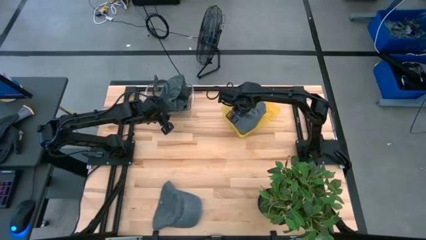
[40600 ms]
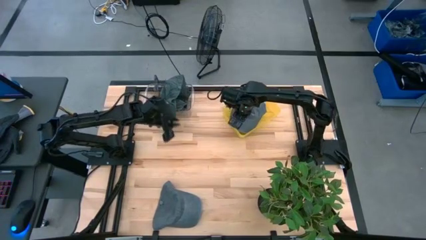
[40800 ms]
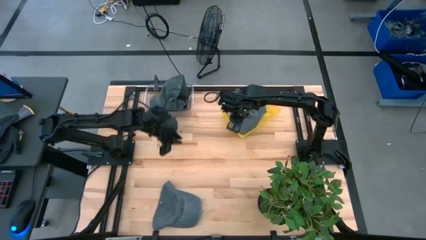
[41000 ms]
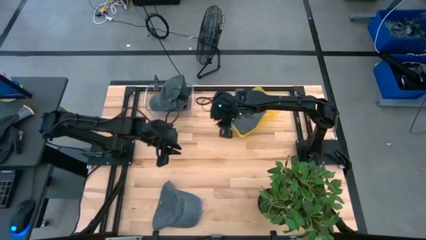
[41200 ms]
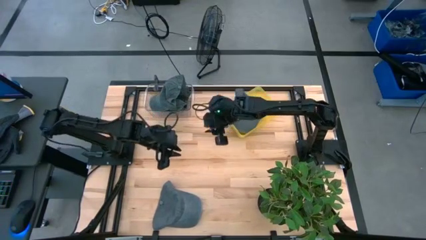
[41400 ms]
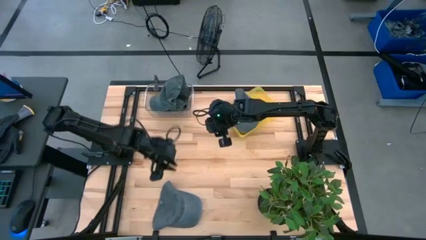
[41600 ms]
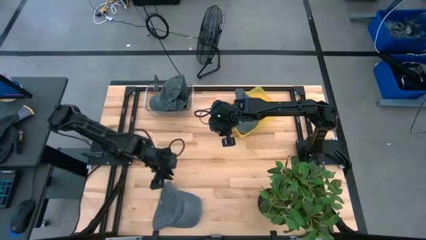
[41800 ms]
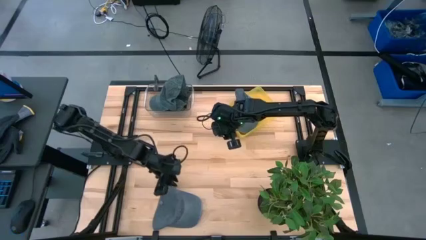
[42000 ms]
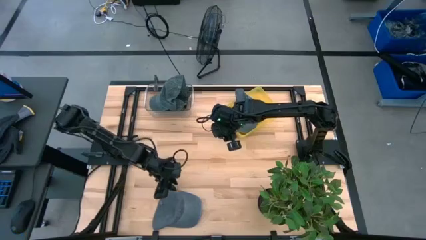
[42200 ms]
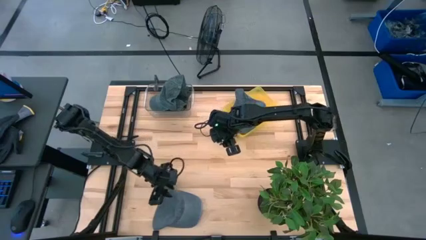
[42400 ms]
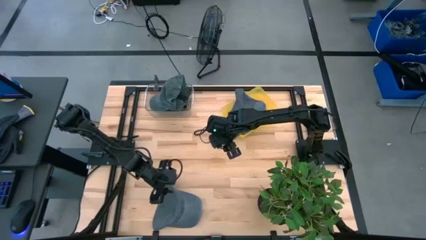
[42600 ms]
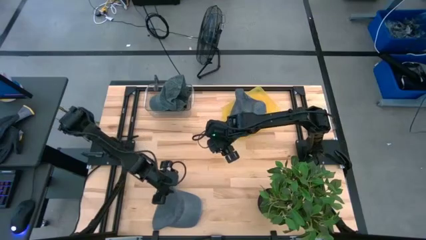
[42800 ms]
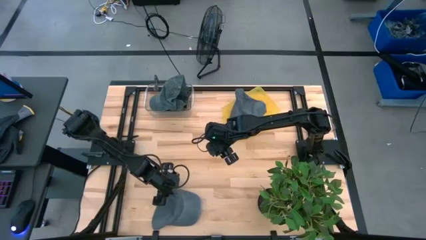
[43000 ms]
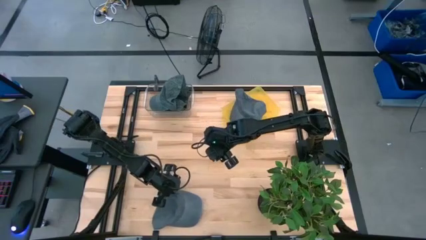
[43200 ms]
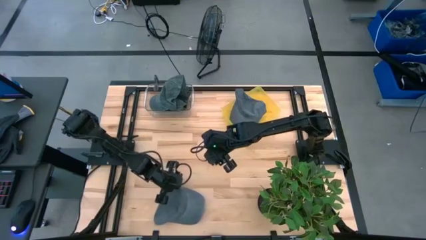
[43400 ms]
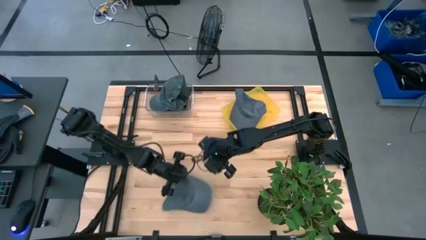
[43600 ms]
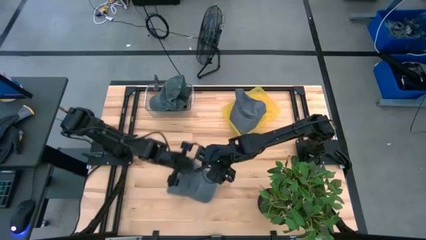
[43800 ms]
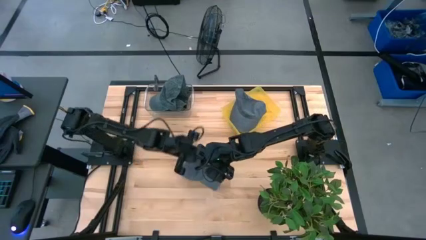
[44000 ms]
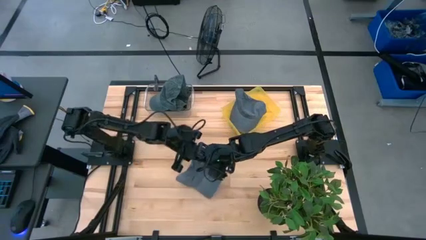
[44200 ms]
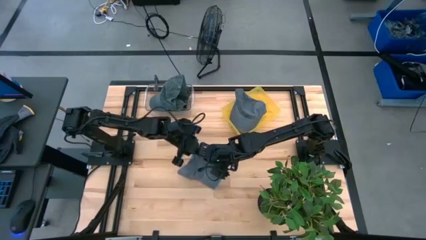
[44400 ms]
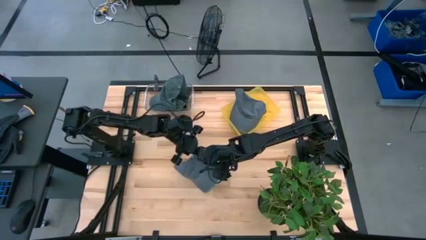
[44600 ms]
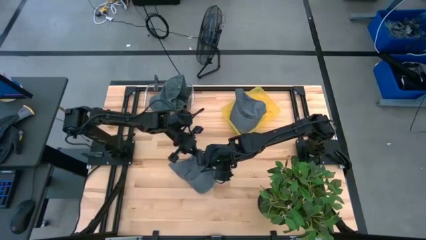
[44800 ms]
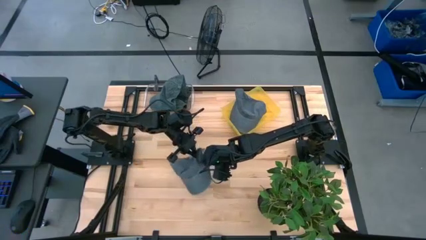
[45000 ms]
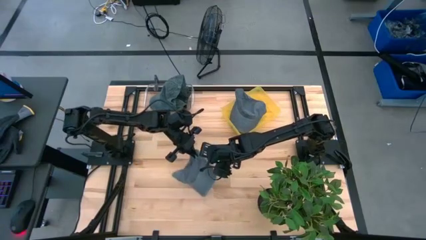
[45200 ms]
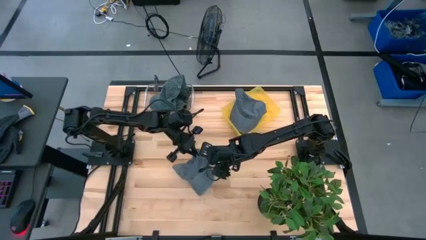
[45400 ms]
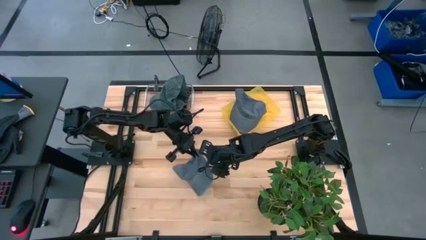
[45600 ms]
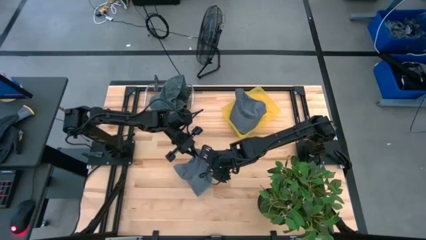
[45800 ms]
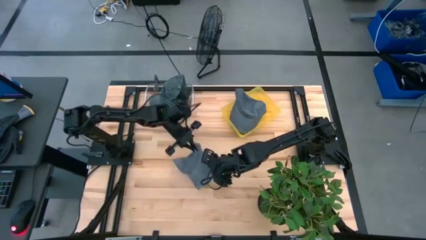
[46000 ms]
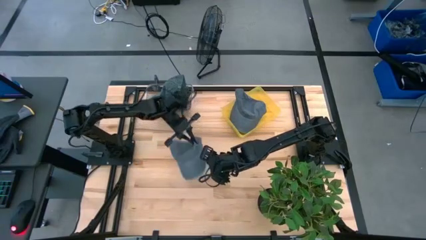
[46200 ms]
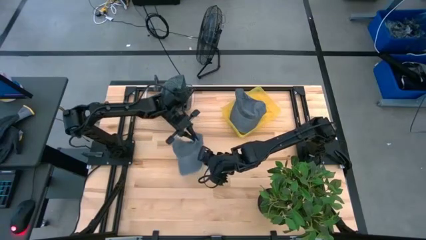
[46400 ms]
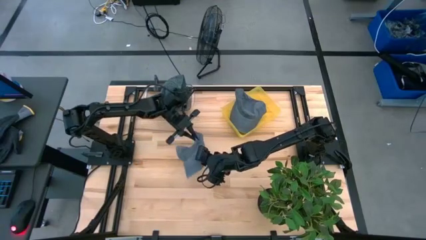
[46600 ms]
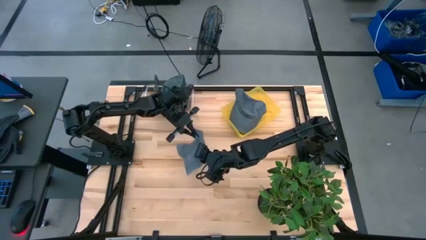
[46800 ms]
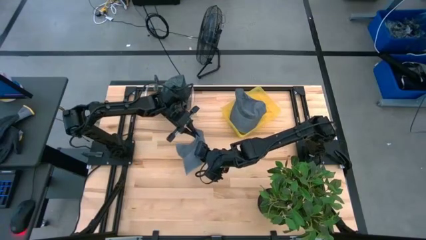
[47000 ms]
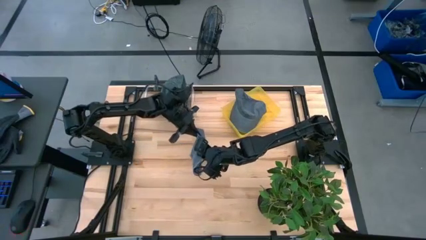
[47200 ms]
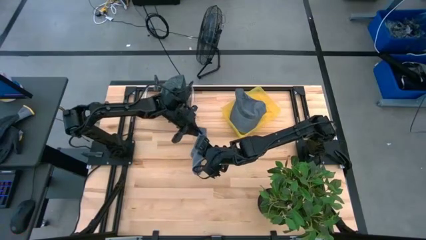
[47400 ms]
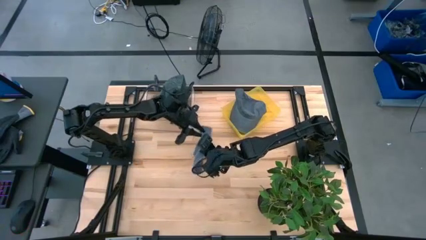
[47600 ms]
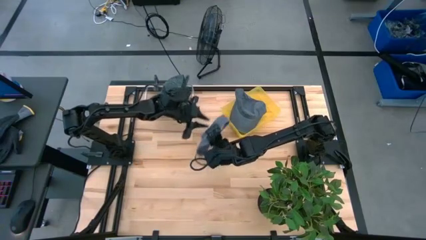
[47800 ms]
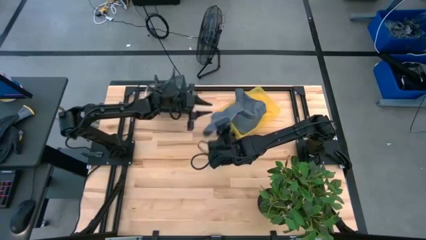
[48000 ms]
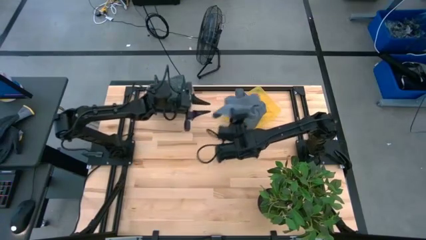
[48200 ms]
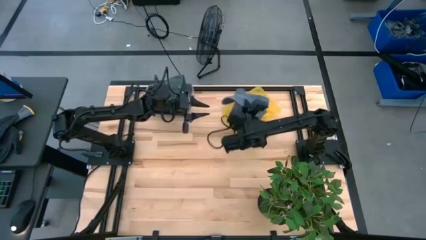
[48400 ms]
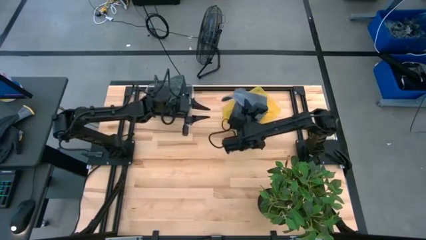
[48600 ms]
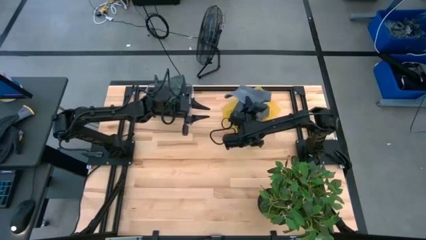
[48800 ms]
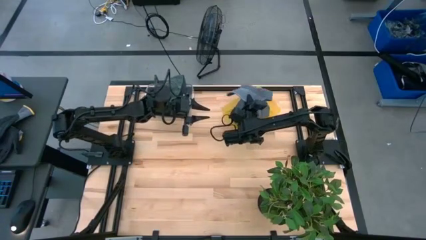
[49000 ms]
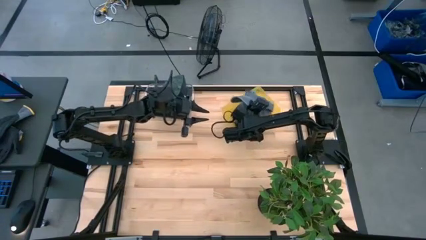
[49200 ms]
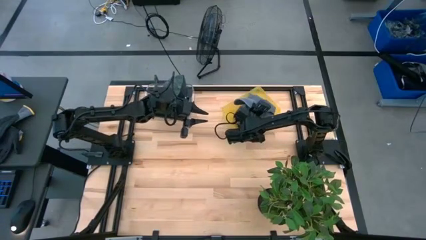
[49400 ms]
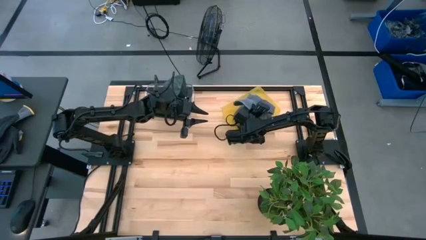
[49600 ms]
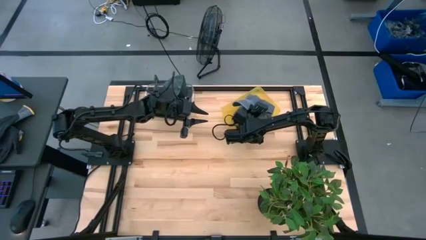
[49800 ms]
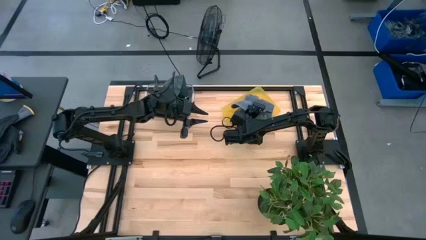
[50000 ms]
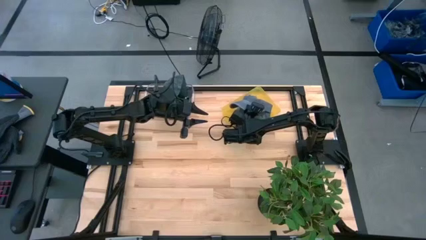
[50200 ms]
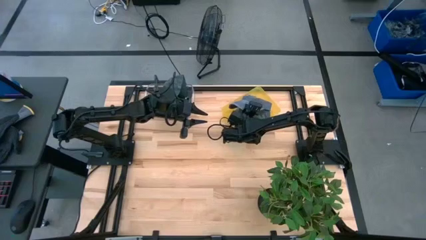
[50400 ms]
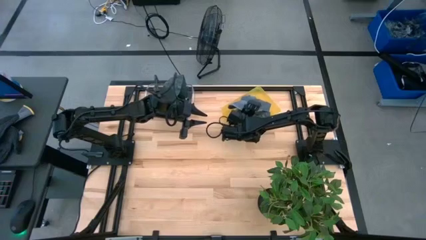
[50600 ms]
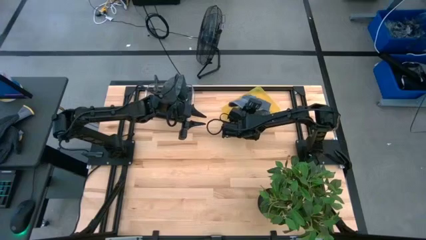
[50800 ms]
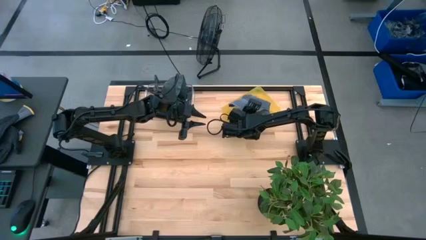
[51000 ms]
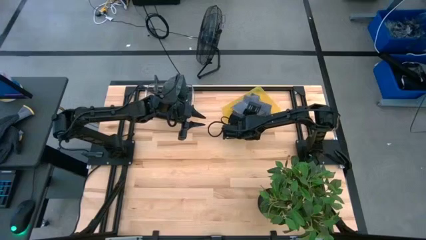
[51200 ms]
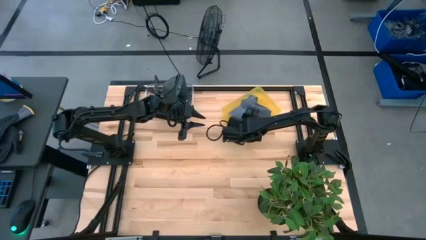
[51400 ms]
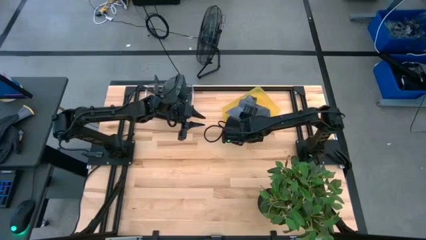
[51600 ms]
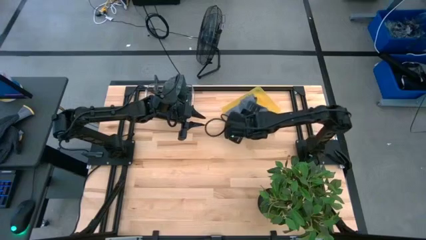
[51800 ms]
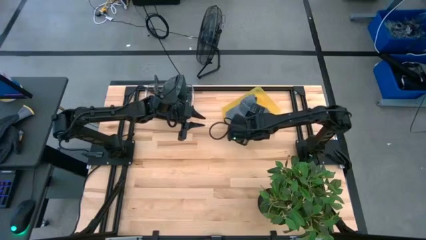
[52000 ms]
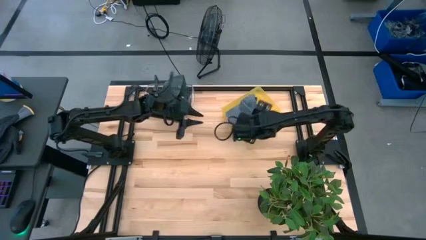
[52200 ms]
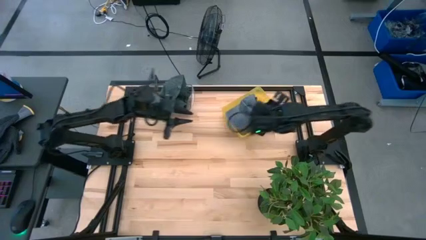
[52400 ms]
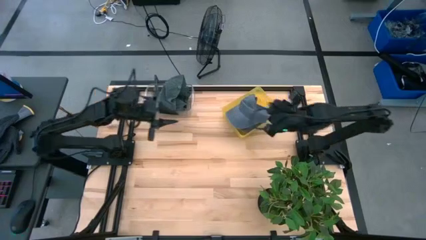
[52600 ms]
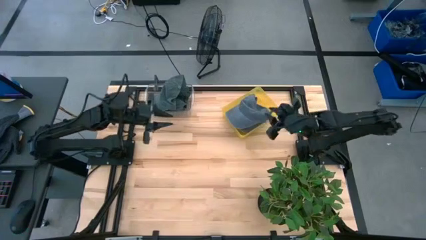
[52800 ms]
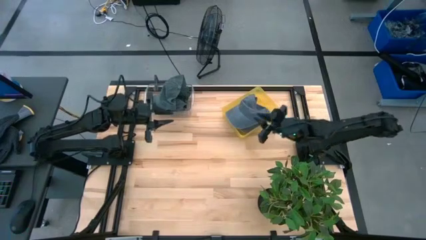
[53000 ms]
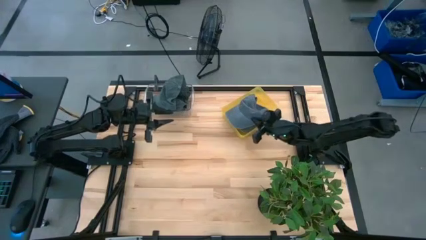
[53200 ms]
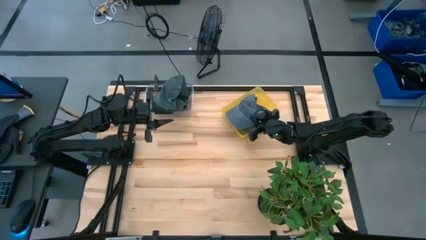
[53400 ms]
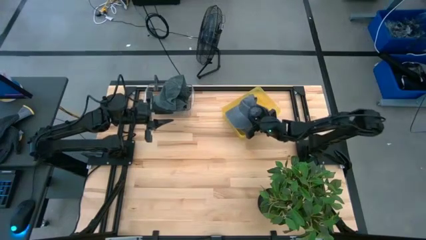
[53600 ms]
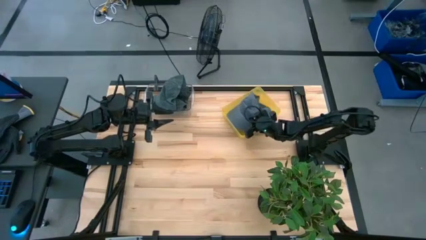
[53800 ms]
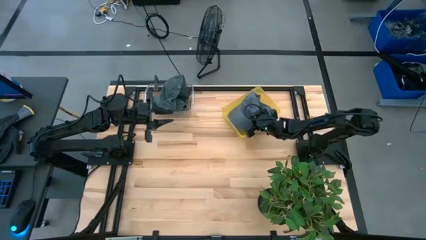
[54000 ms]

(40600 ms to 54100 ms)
Task: Pick & Place hat
Put the gray cap into the yellow bin
